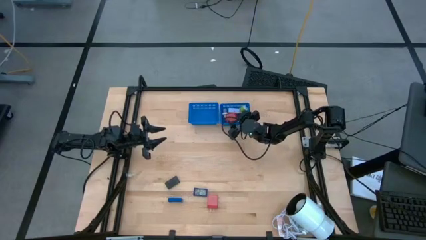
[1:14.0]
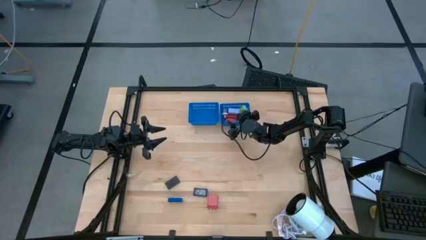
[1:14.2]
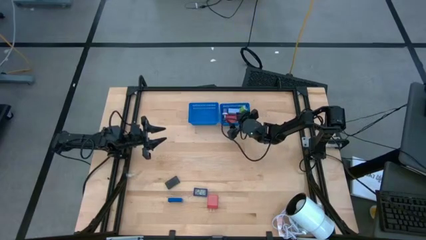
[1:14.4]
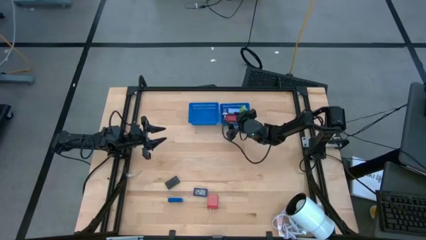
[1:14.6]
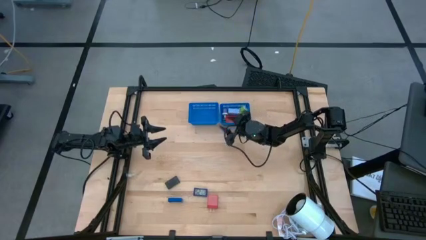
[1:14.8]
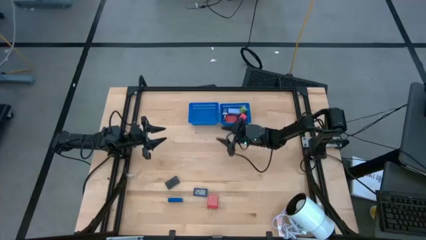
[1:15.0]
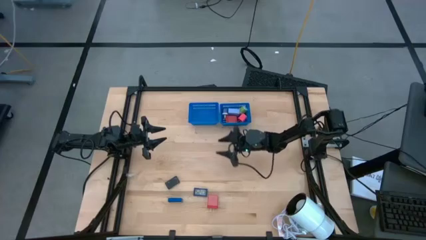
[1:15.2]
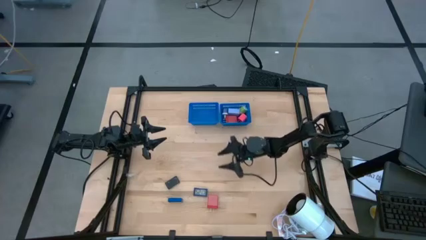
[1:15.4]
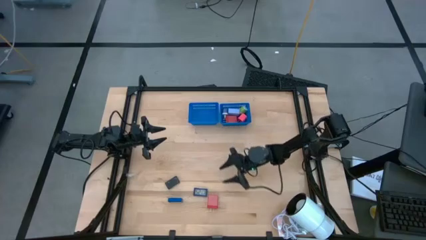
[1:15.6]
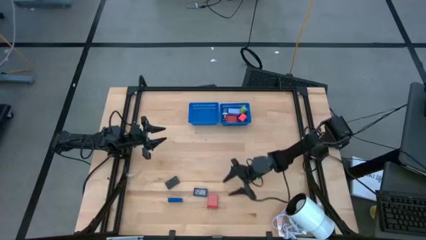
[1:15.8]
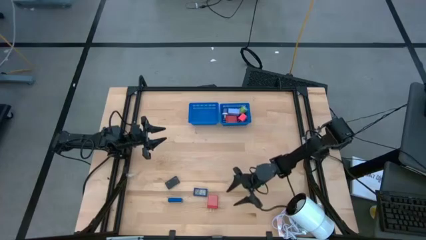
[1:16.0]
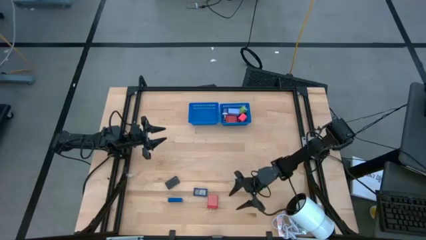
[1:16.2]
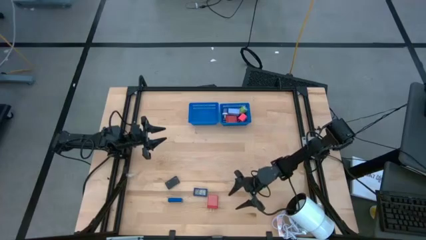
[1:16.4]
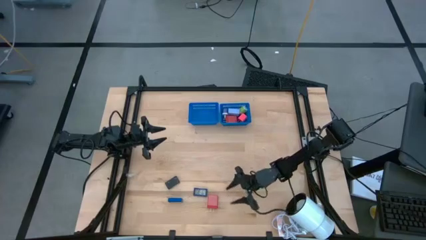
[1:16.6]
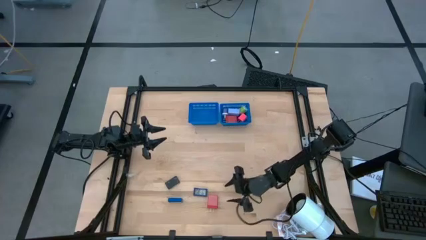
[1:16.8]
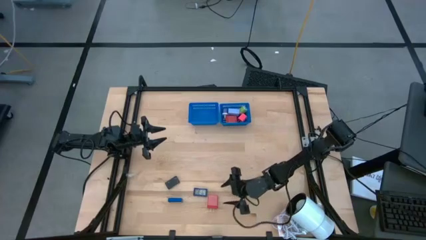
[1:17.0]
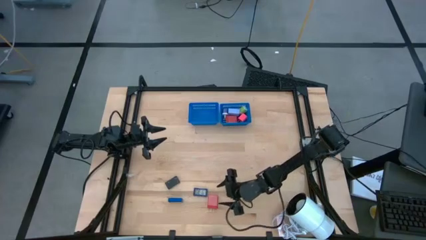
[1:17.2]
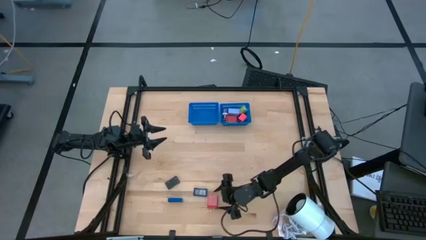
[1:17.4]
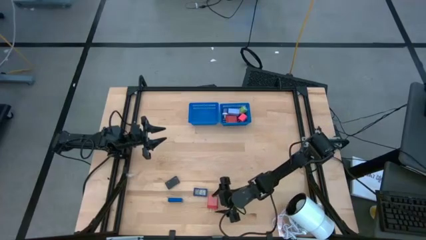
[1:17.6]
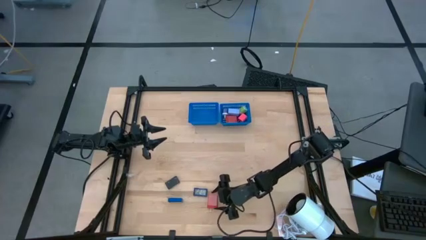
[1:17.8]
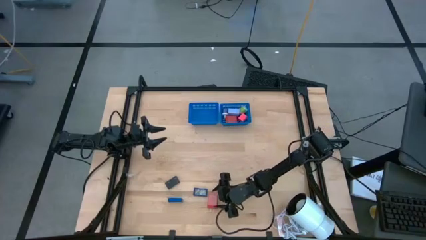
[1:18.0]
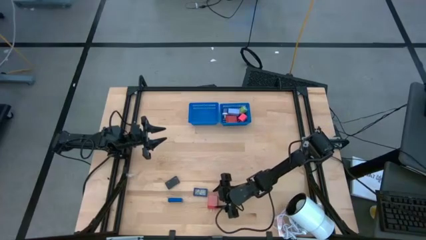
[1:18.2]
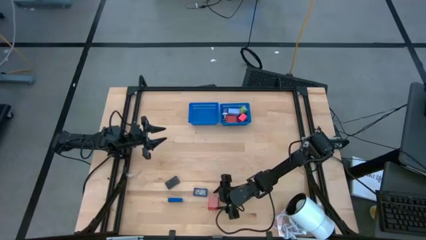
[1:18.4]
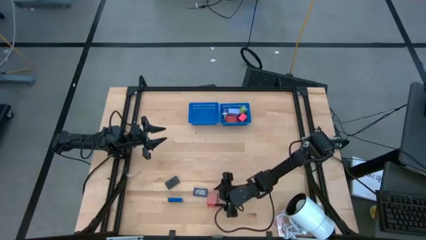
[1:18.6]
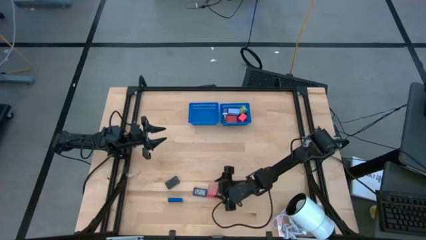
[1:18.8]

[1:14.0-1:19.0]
Task: Pick & Place Office items
Put the red charger adapter into the right blue bin

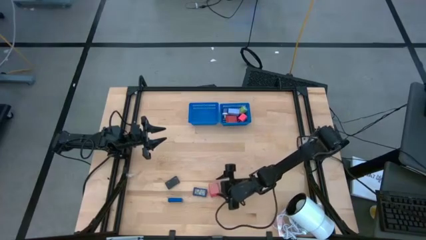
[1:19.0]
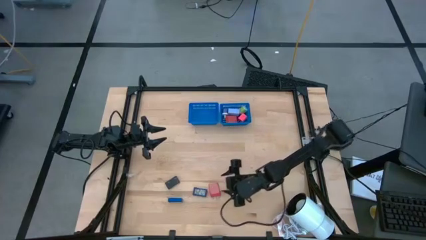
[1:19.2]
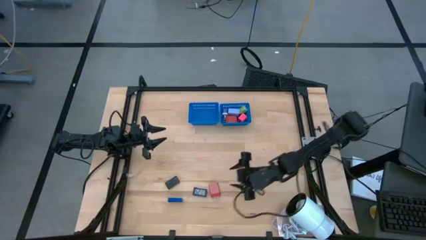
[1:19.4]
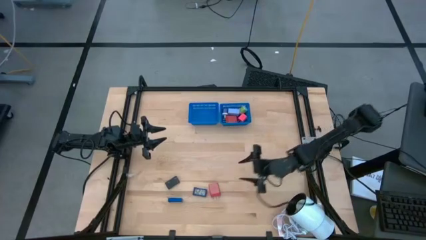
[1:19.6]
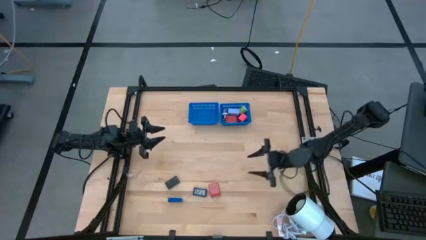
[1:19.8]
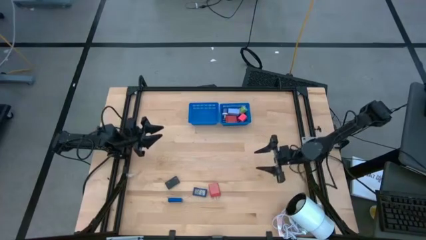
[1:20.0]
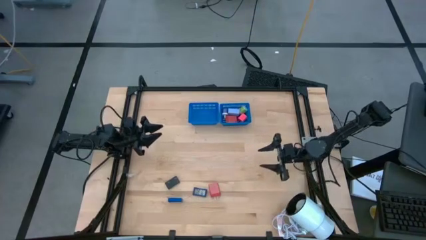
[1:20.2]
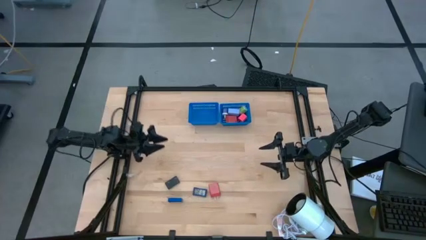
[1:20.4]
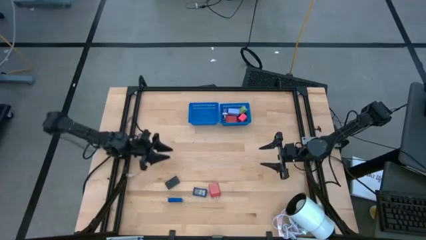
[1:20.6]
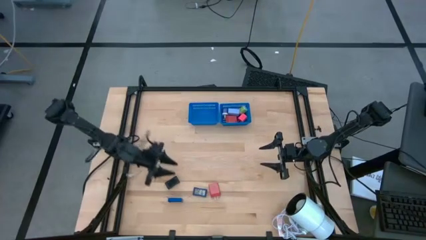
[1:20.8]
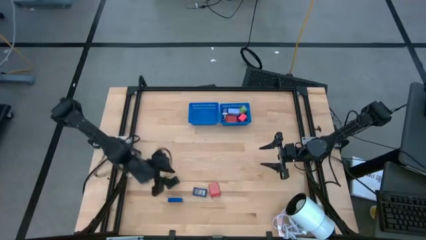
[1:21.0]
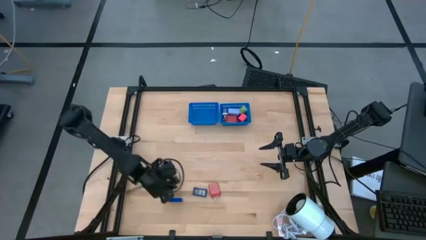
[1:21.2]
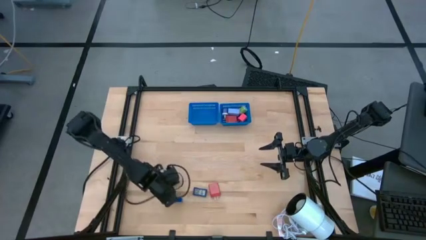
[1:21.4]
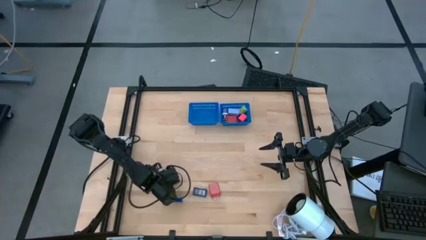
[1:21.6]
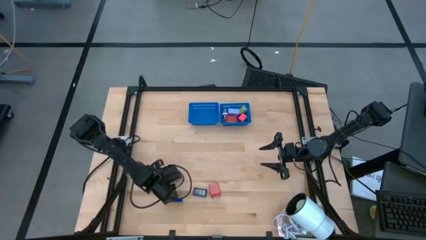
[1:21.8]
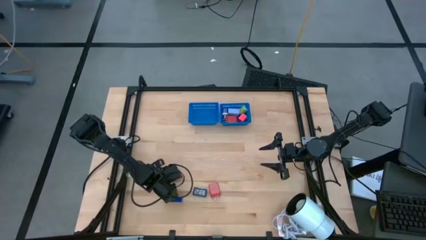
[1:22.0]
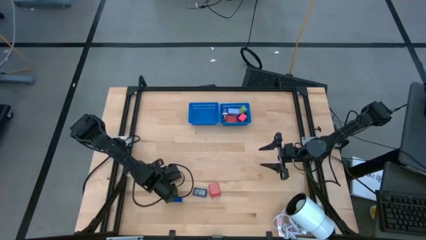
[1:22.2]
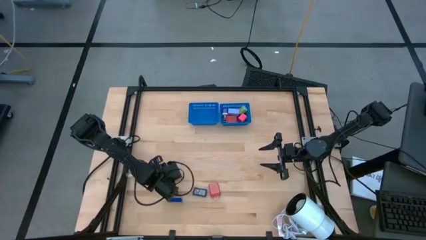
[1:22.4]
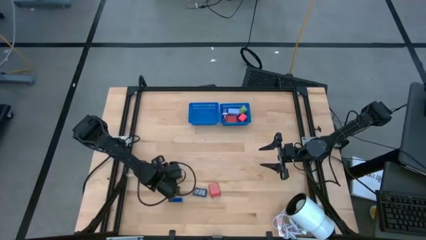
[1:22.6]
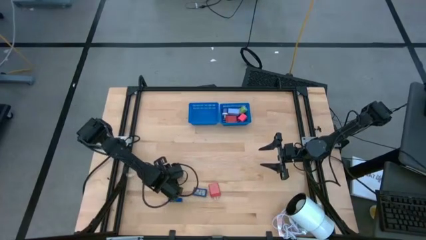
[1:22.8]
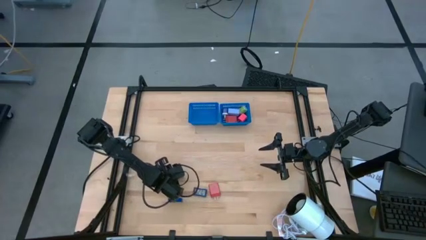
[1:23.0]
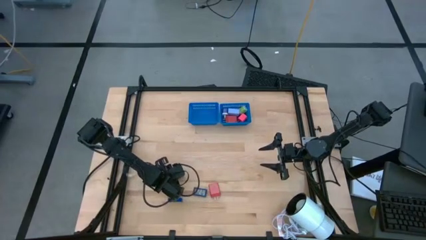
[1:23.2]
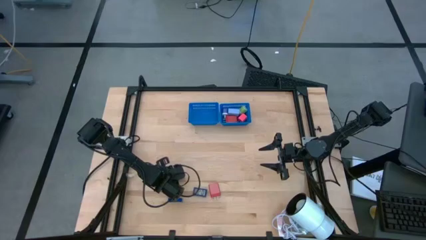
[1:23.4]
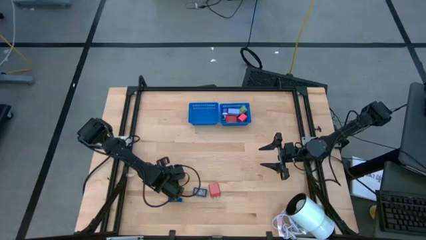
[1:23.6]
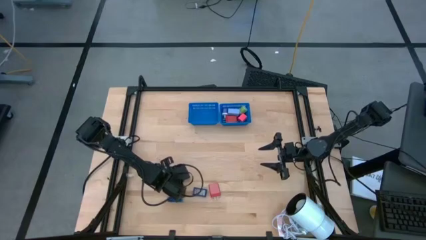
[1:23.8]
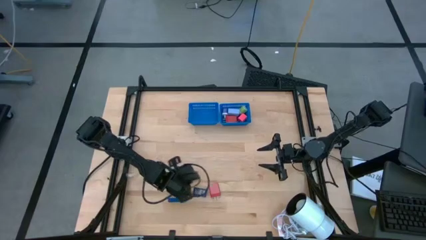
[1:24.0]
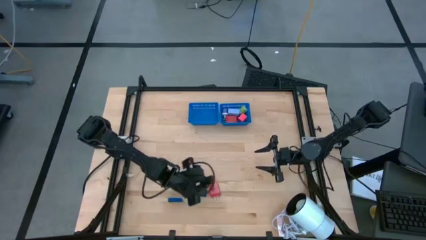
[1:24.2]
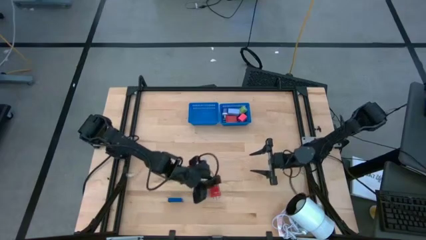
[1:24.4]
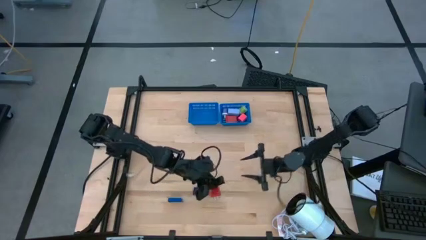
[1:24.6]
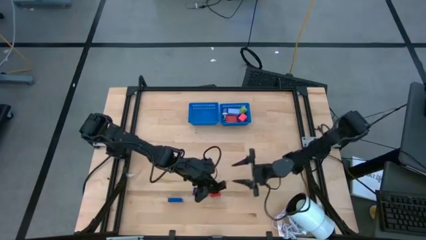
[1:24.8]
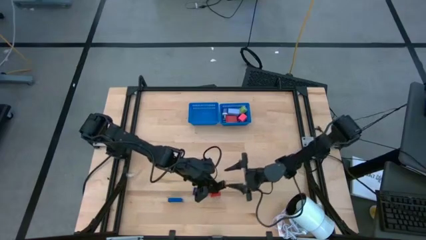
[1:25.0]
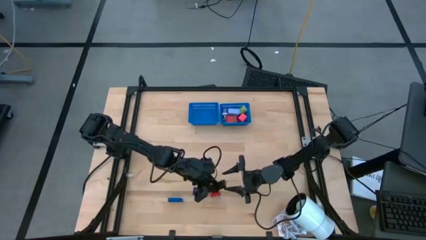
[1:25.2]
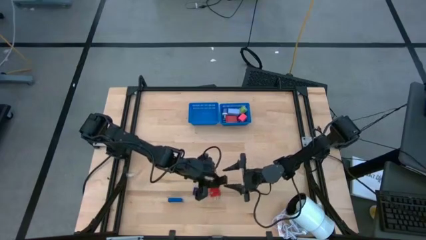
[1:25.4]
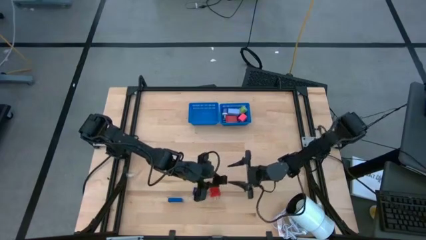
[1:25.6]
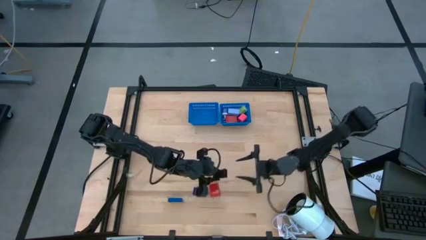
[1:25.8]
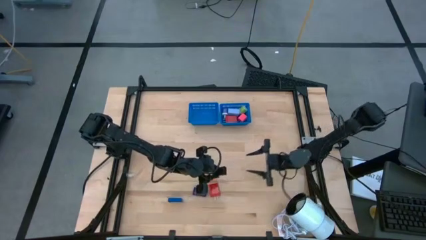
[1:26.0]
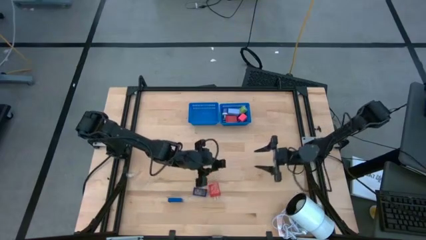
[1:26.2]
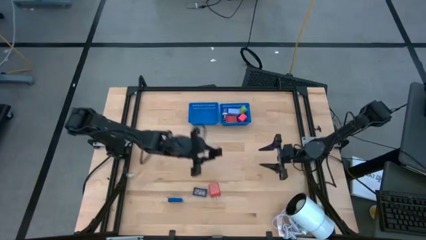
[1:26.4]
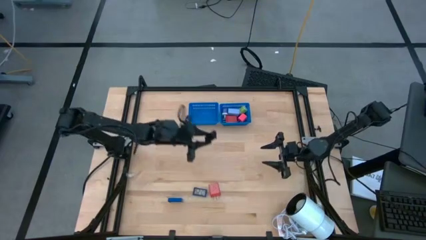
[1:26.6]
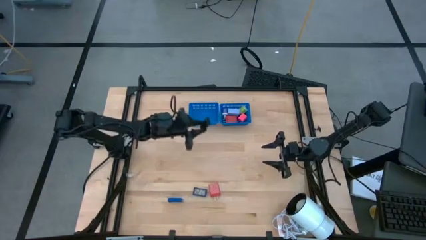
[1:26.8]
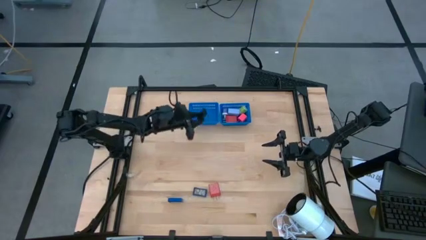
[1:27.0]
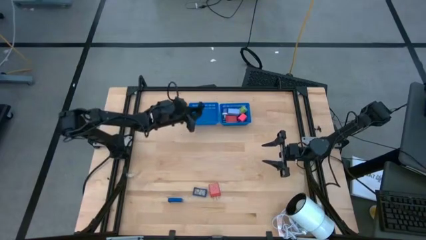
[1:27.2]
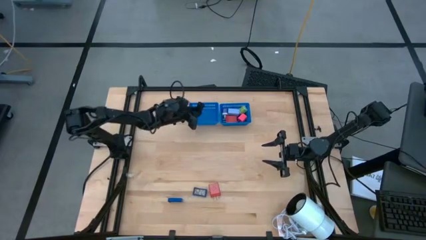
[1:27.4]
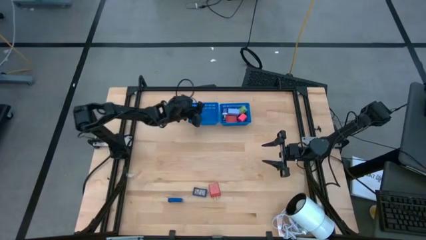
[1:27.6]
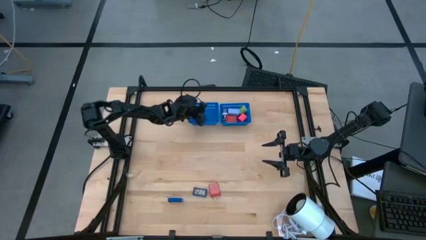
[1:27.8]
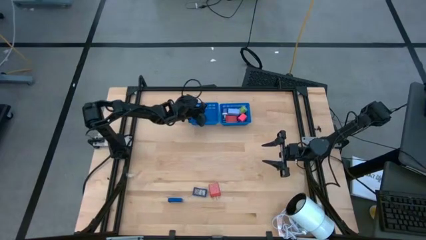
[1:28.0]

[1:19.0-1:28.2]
Put the black timer into the right blue bin

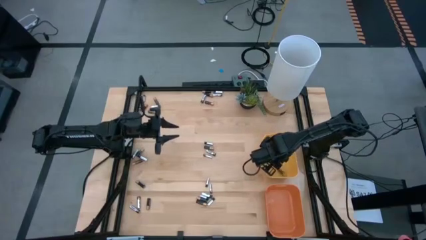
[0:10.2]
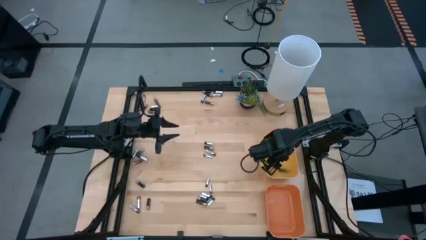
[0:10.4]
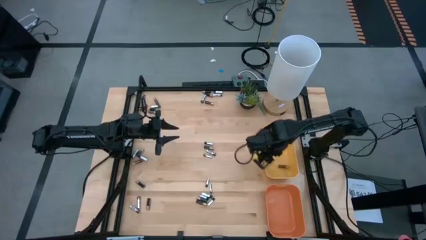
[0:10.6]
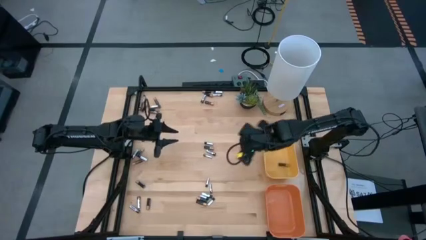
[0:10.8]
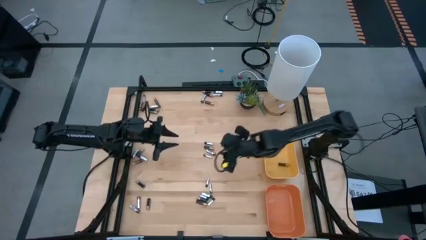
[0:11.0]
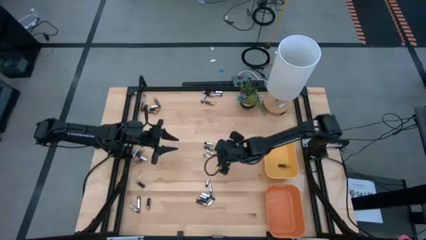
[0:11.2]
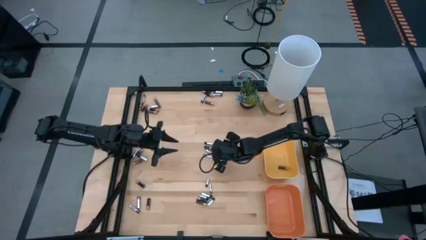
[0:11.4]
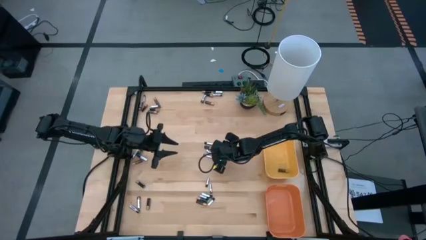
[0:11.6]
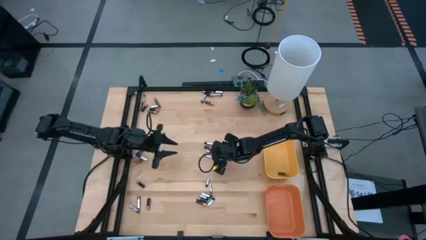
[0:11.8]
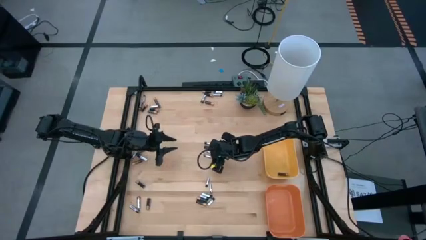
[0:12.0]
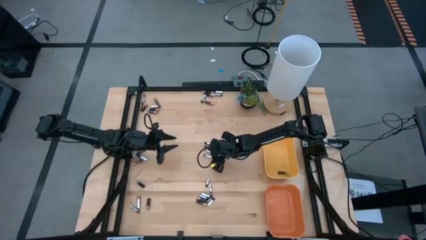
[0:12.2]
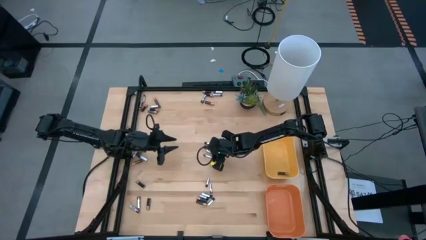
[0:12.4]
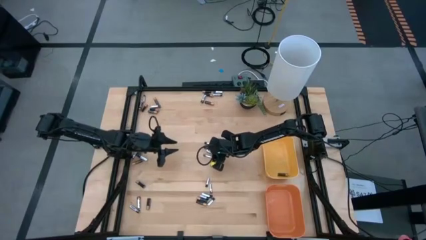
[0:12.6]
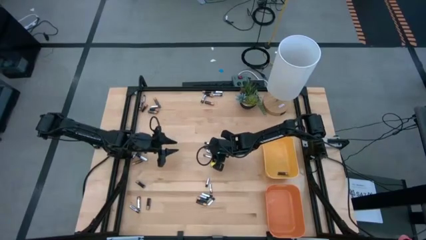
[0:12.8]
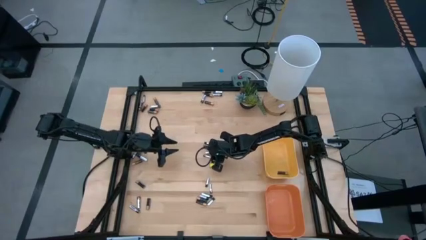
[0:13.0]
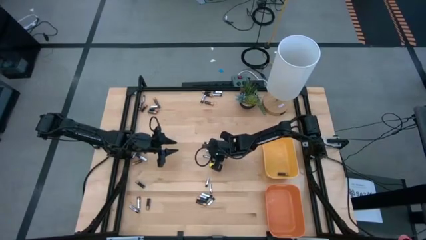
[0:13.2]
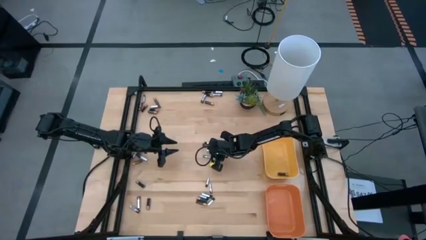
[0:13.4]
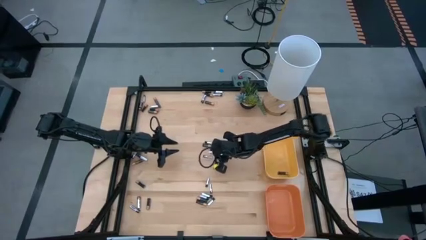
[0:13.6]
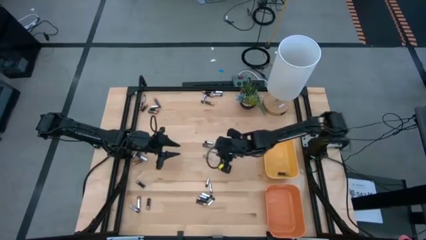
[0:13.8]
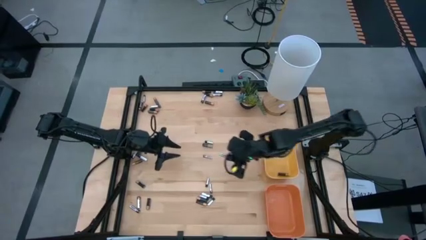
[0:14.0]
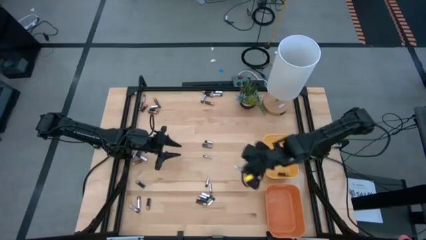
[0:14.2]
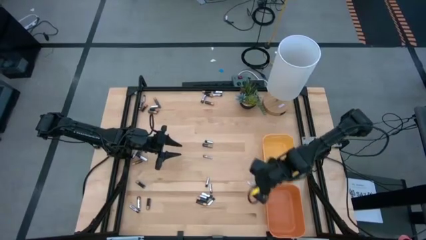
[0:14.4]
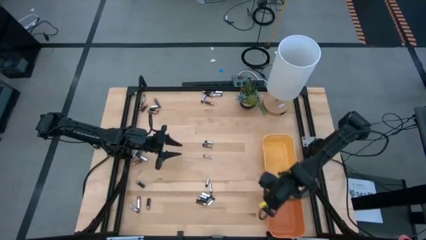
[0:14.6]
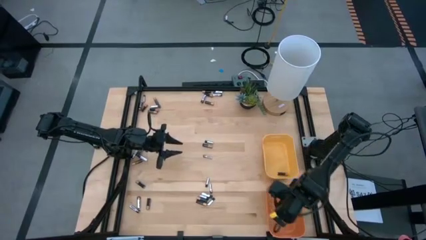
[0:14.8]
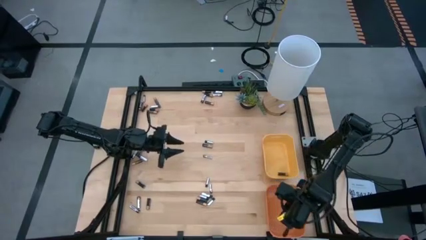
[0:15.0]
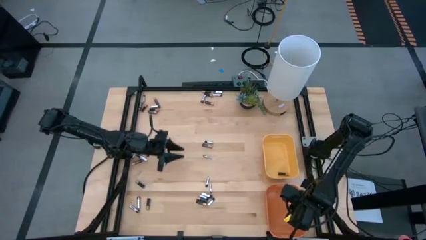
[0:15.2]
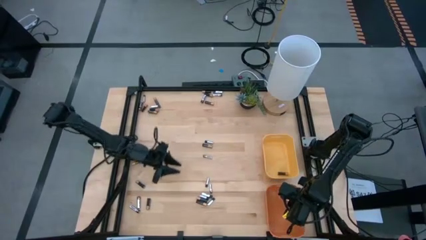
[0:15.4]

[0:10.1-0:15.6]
Task: Sort batteries
Put the black battery into the orange bin
